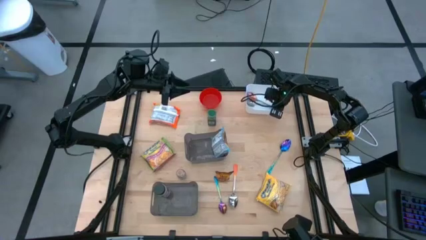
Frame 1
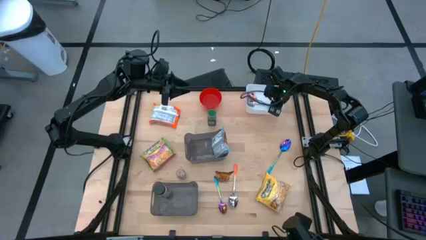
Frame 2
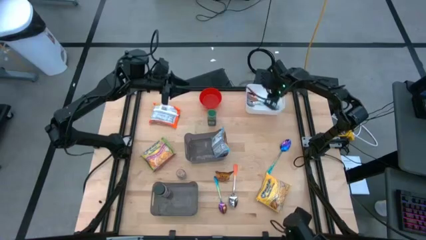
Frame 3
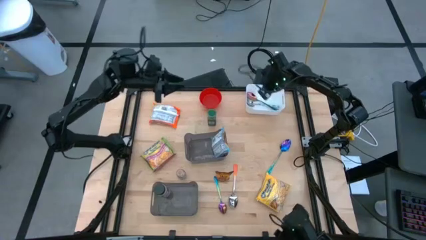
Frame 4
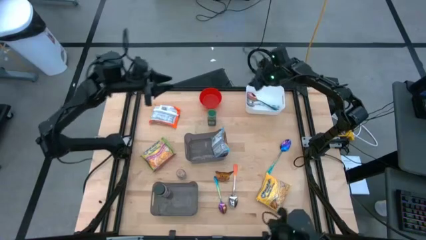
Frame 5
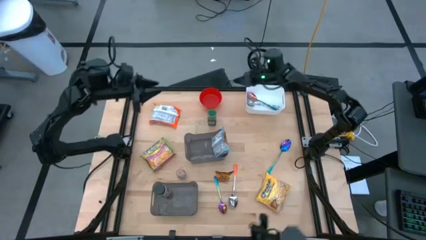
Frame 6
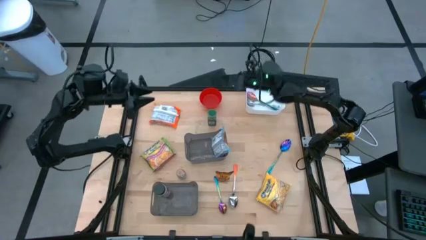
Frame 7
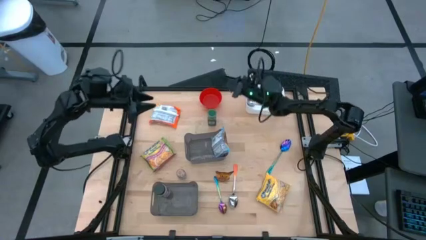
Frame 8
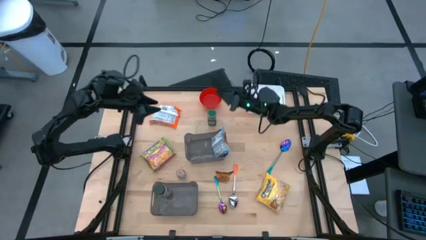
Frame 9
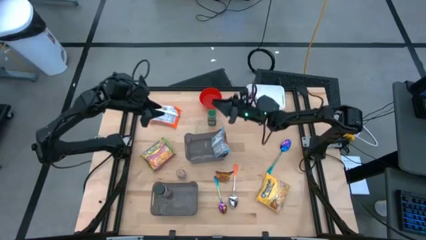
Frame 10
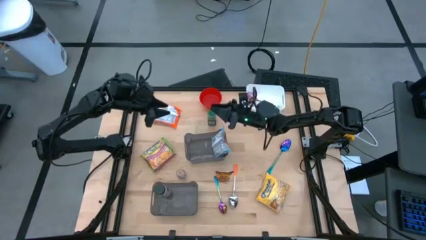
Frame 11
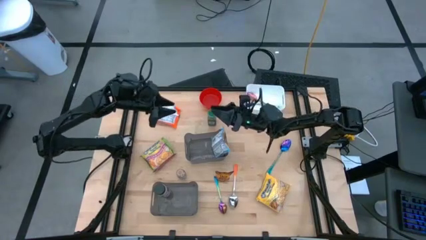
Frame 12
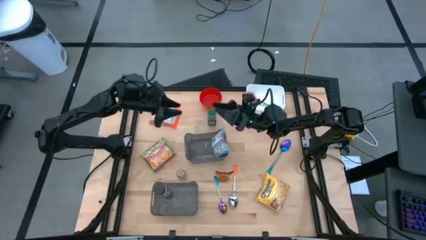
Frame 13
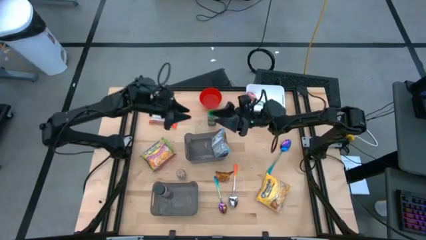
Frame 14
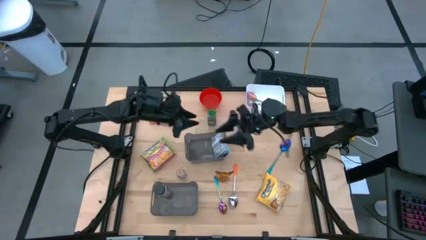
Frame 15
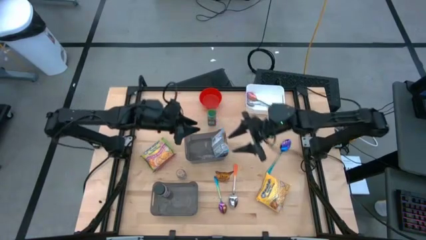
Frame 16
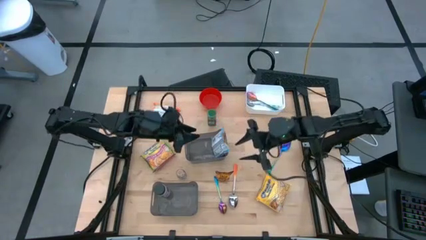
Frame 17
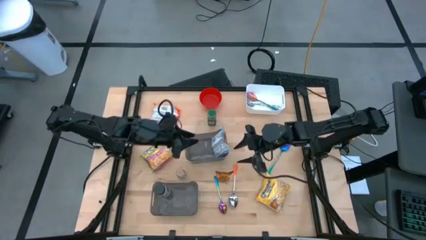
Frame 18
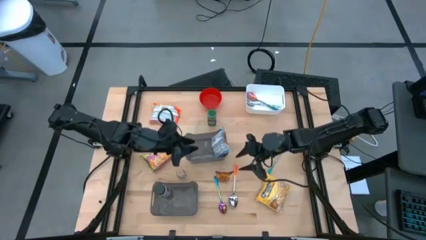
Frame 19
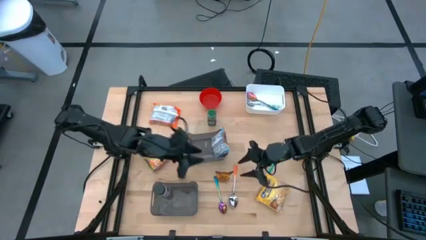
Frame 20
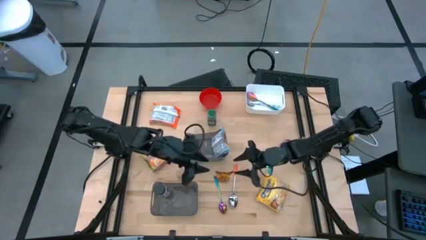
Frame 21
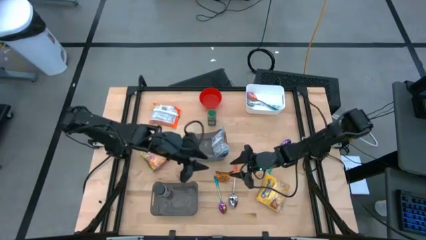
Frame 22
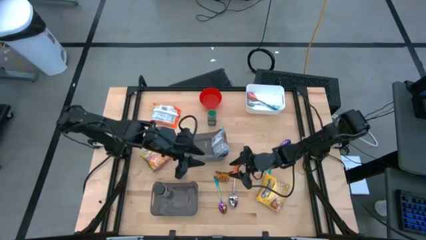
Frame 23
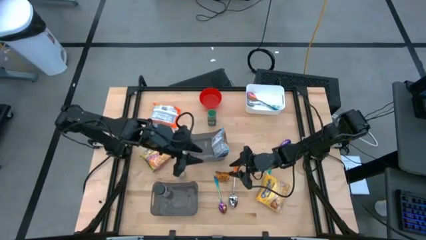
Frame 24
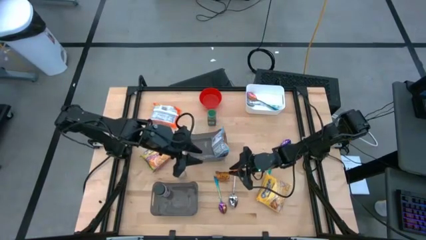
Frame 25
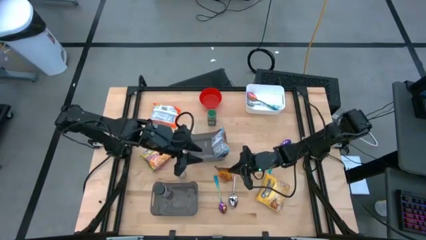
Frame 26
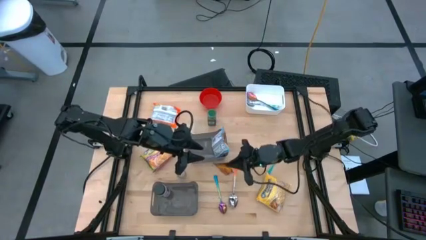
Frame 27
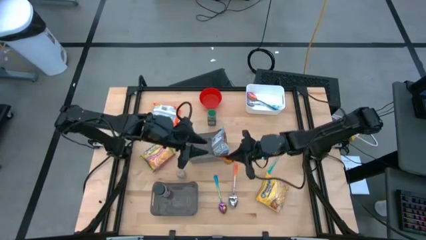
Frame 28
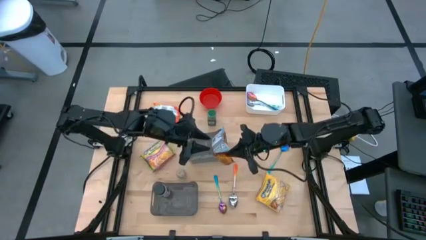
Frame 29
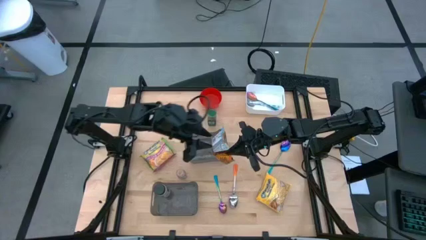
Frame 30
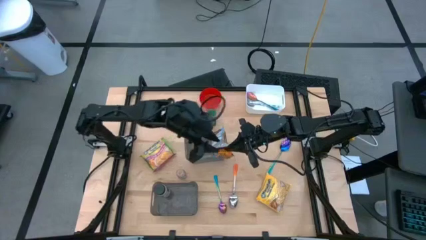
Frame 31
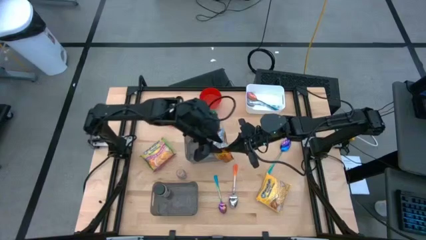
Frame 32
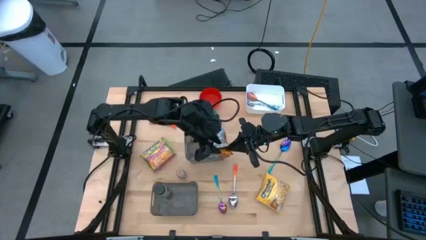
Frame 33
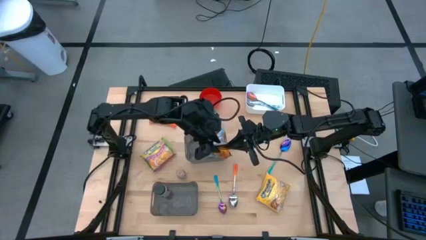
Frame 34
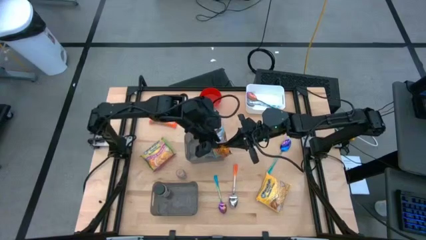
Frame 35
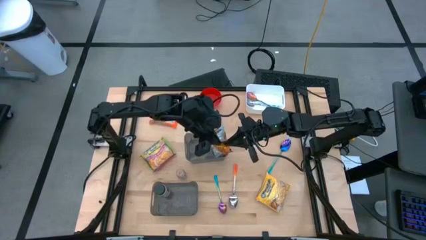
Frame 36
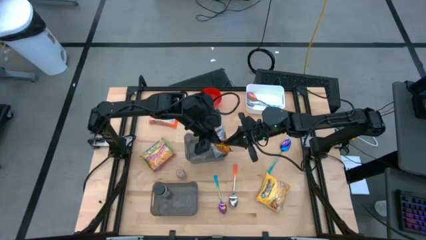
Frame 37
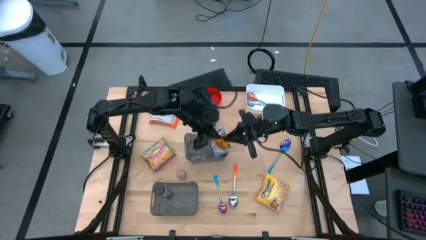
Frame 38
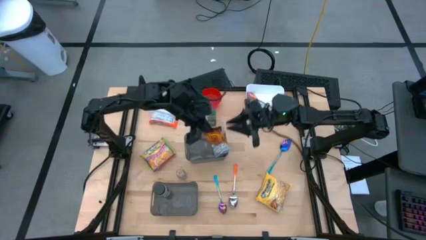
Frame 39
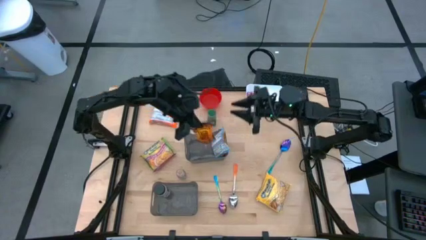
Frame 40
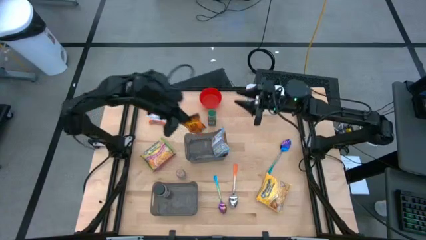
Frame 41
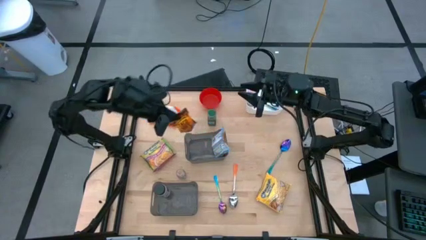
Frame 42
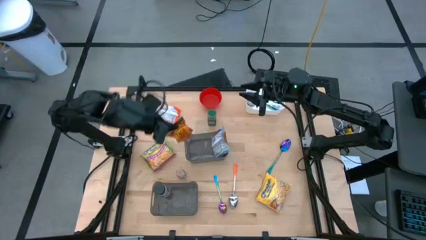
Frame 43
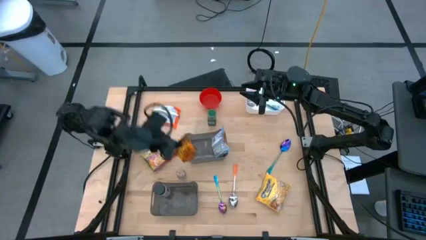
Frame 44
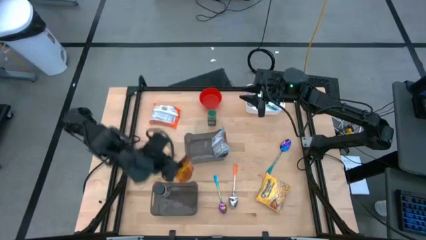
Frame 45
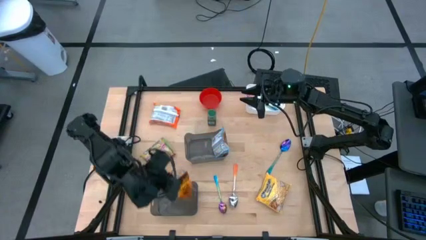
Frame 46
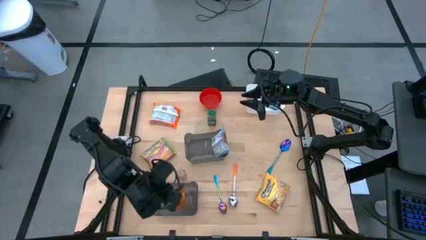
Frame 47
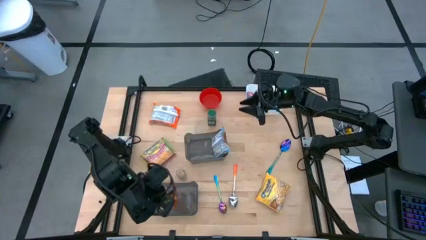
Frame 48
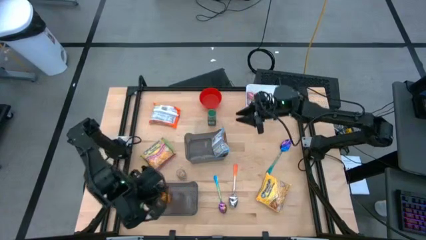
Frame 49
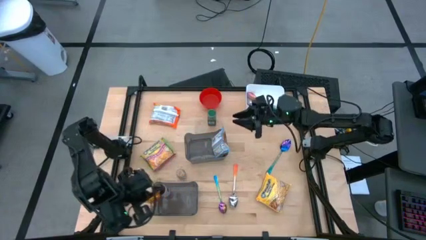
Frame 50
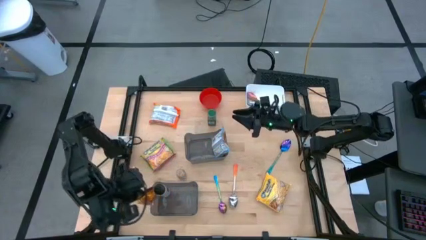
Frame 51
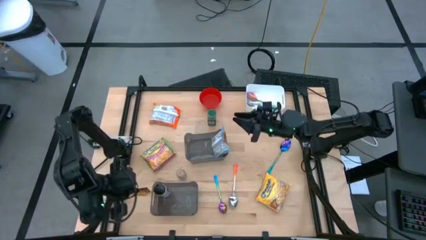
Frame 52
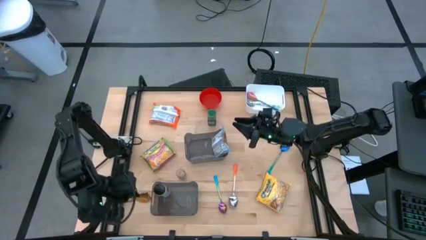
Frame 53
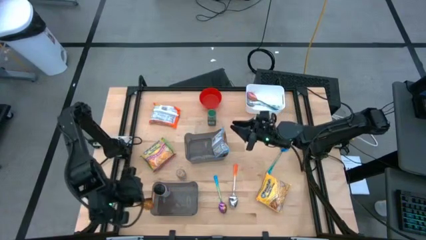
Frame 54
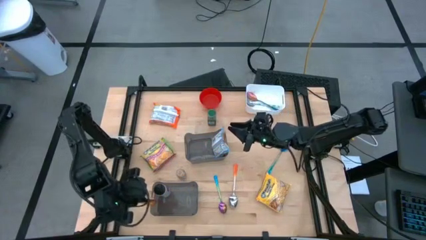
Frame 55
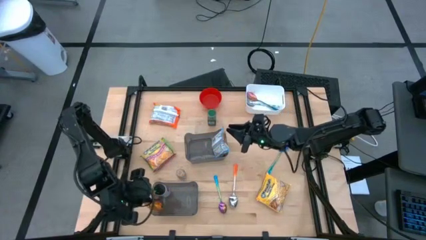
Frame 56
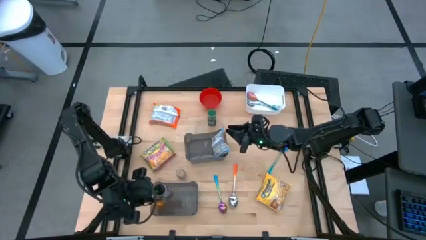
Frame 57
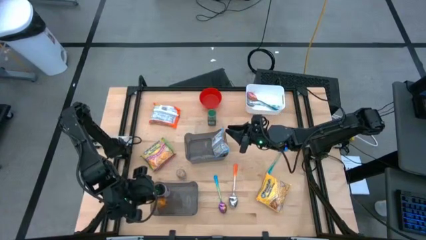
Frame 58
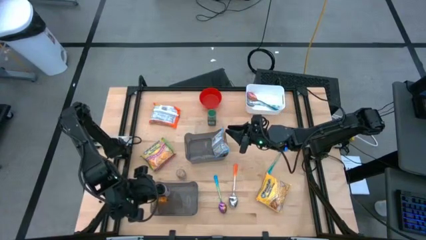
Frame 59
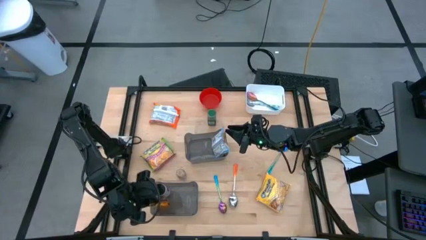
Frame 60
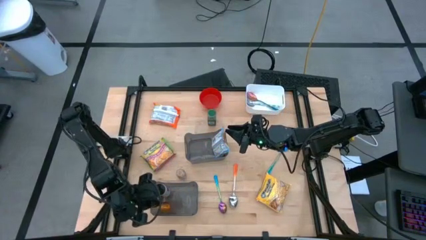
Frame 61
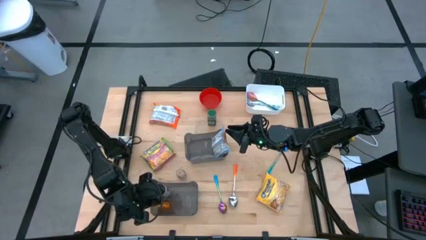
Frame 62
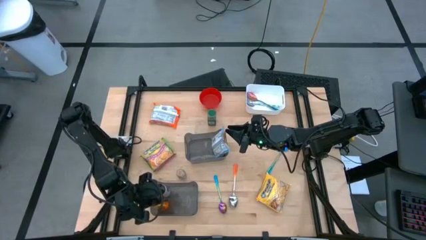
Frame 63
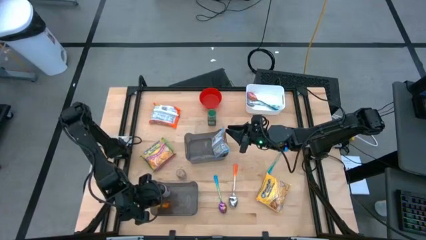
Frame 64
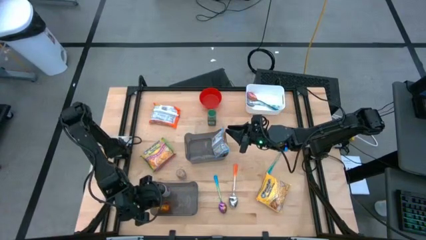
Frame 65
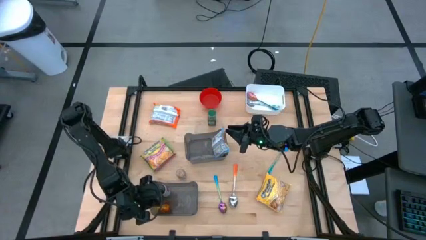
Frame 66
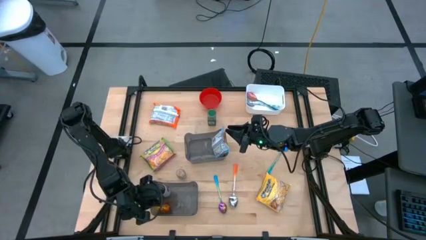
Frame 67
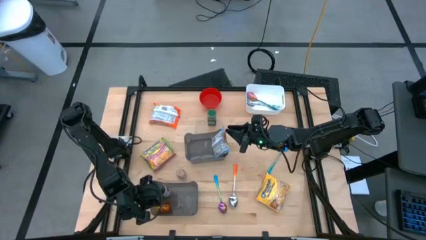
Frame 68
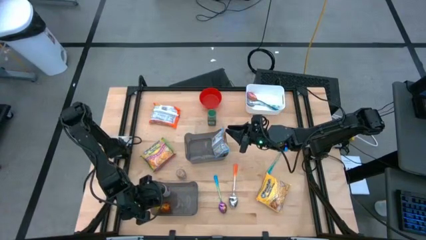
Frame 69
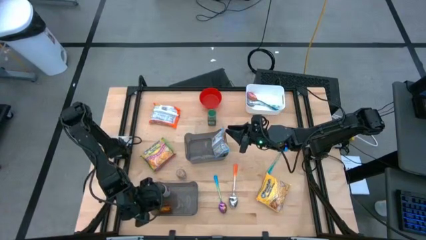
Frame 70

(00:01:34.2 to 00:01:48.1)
Task: Pick & Place Food Item
Put the orange seasoning pack into the bottom black bin

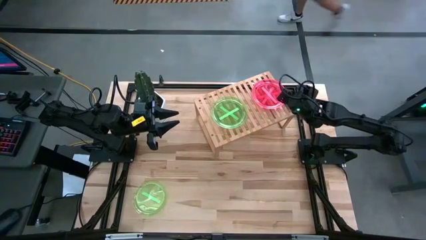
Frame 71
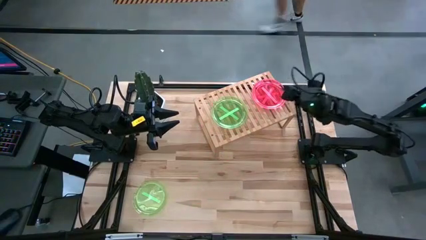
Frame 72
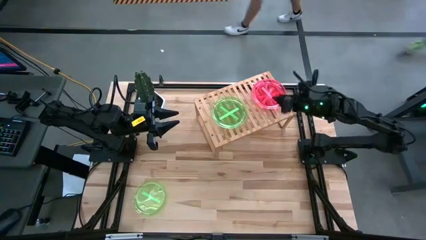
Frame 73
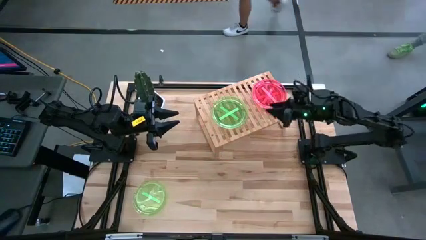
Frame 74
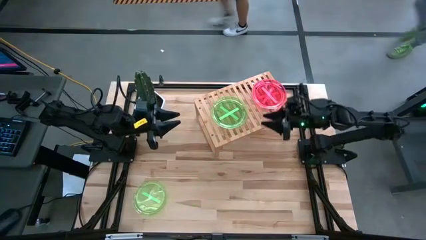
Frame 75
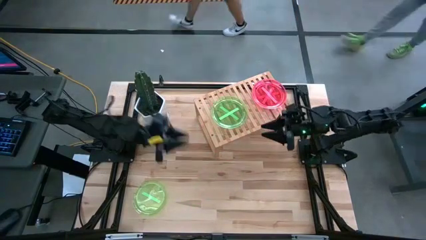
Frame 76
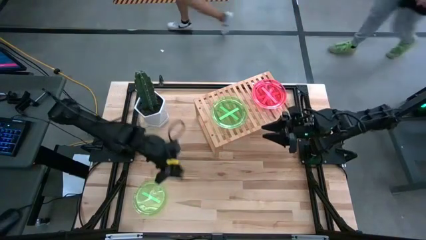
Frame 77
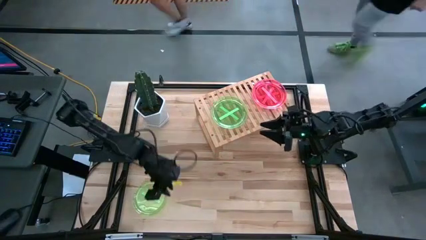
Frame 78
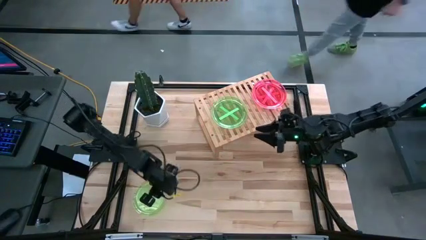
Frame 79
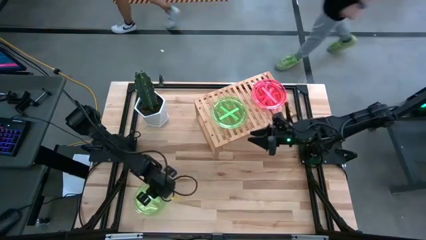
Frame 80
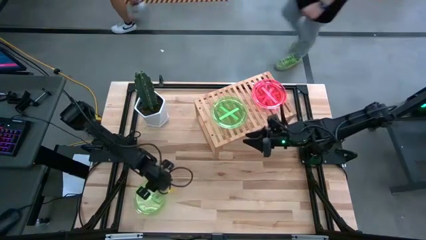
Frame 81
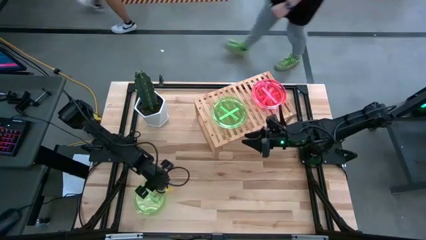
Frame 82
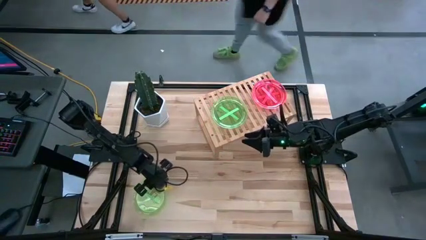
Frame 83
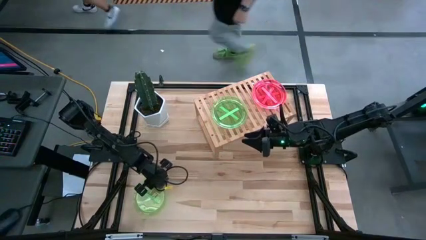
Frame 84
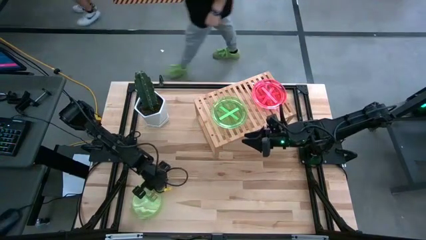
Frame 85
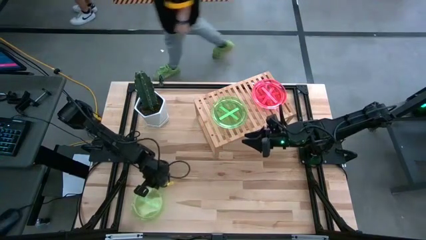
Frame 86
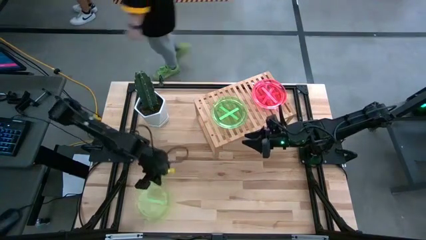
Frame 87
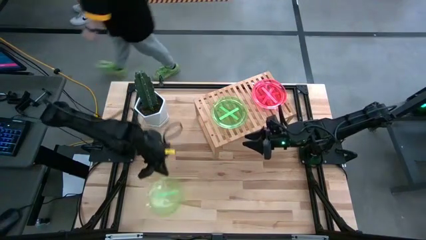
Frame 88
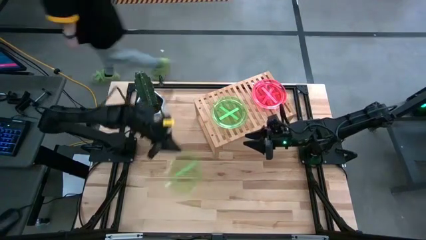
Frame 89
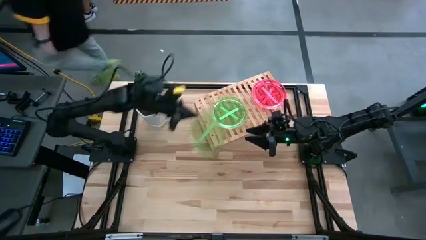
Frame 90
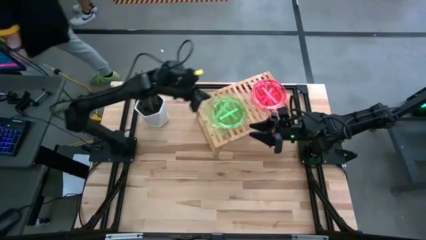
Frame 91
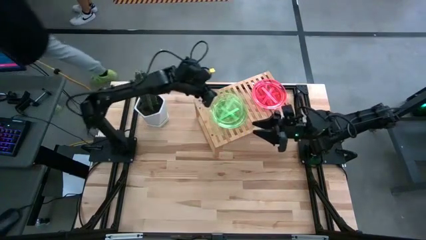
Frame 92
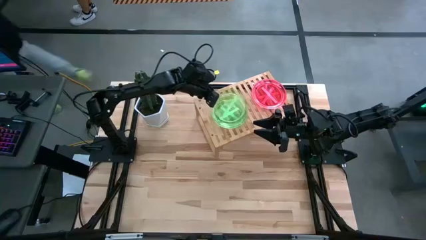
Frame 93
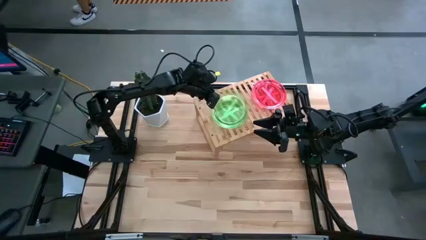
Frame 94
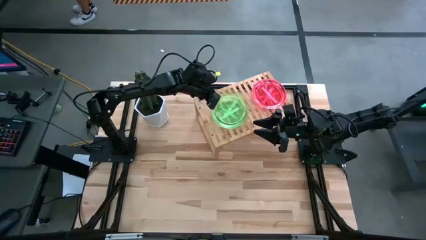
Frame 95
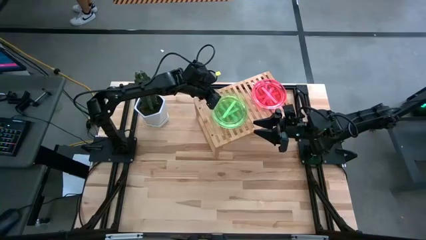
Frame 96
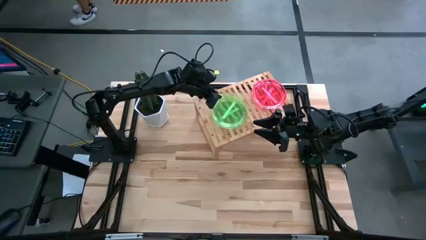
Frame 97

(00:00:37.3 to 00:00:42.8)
Task: Place and stack plates onto a shelf
Stack the green plate on top of the other green plate on the shelf
